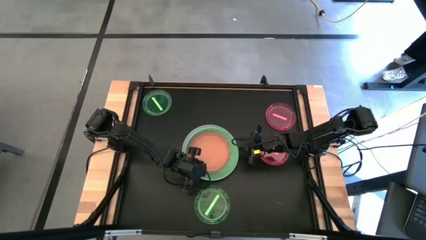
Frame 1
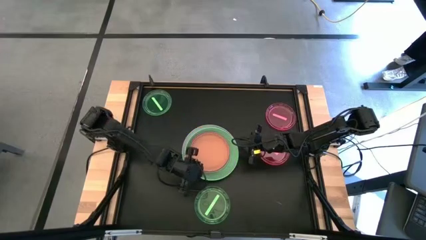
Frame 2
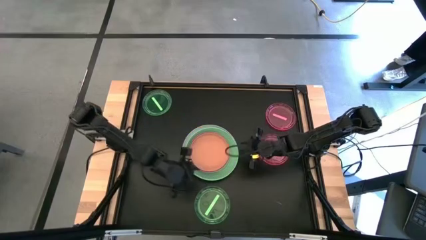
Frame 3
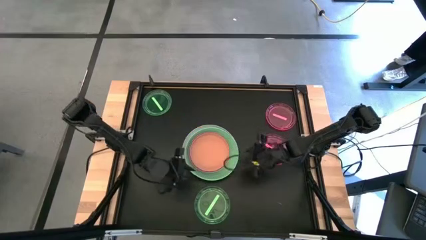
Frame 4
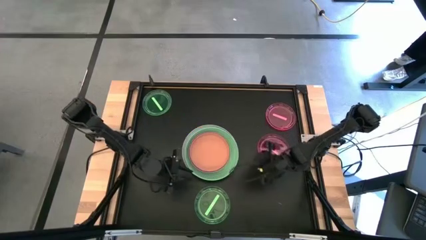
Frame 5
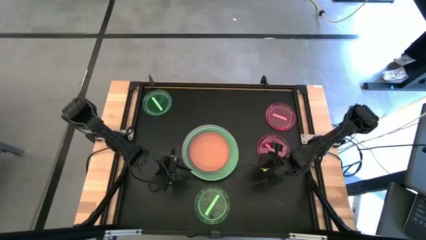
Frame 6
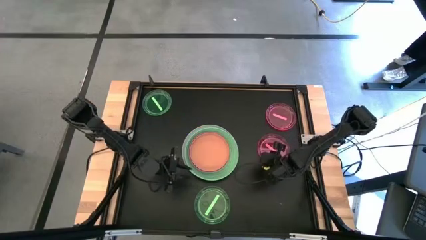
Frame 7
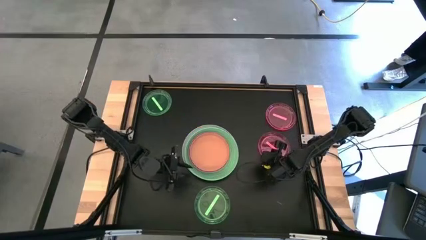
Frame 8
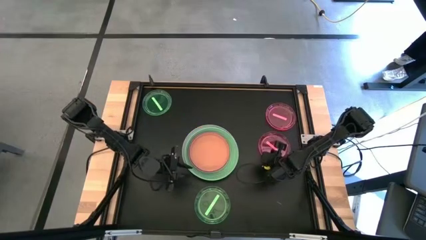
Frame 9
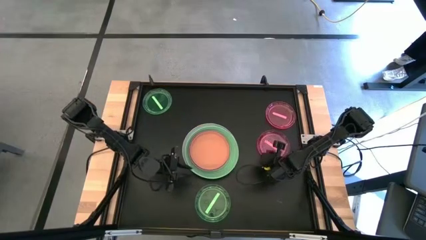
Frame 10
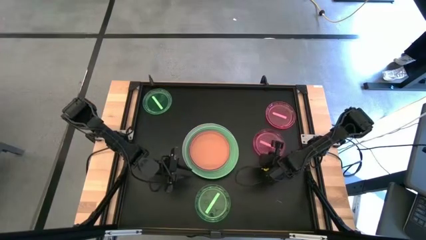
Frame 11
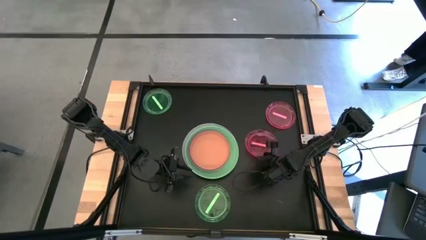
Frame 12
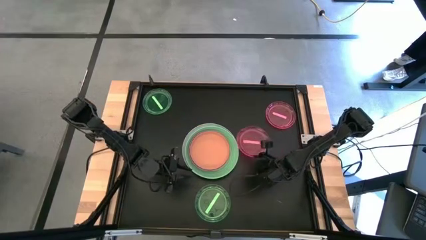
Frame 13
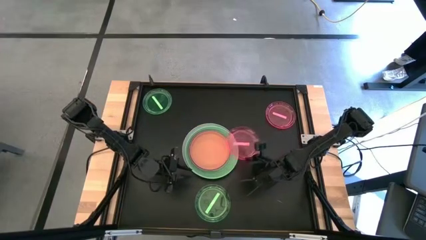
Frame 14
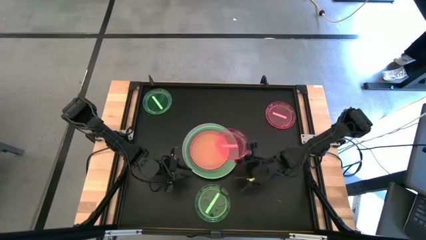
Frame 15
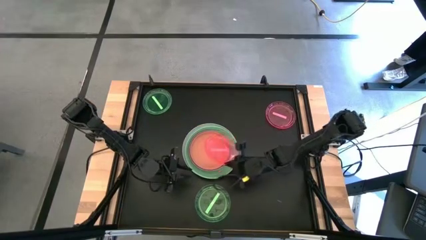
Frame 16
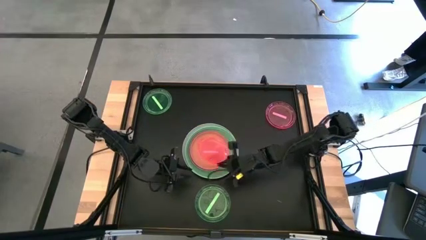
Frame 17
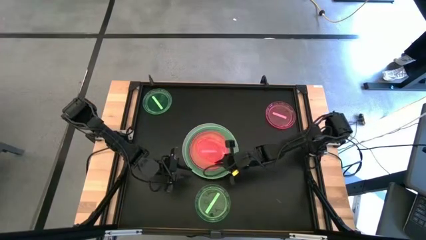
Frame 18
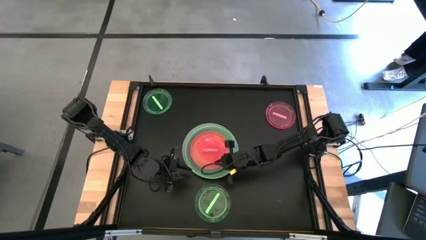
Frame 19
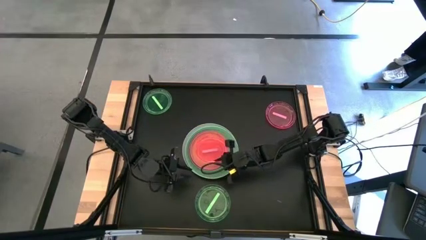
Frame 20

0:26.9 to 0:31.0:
Task: Stack plastic plates
Stack the bottom light pink plate on top of the orange plate

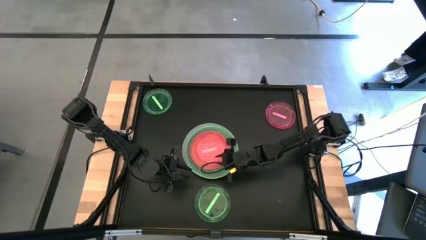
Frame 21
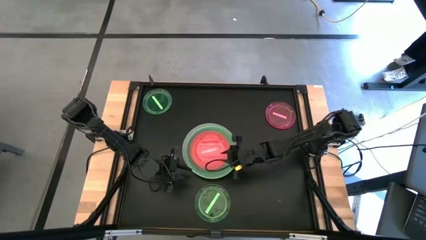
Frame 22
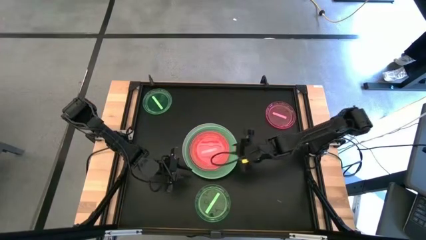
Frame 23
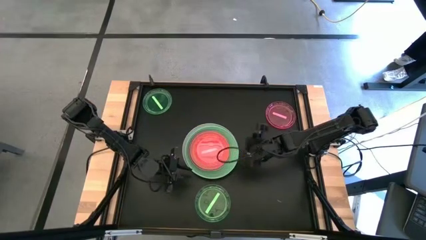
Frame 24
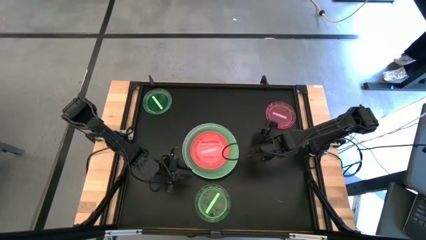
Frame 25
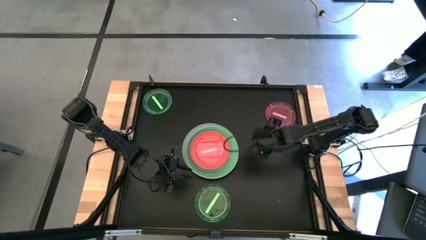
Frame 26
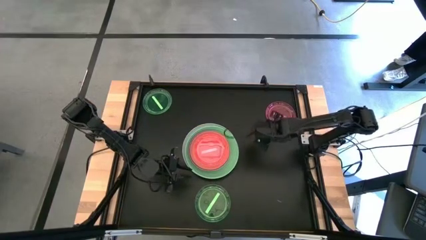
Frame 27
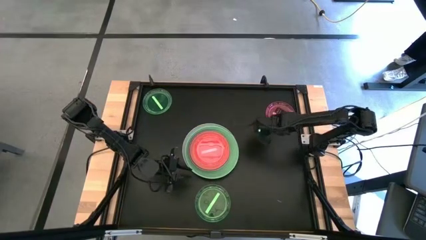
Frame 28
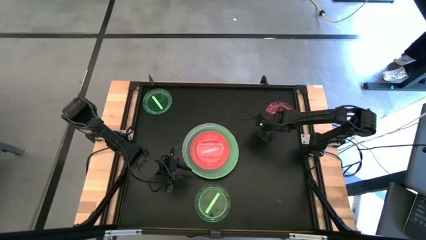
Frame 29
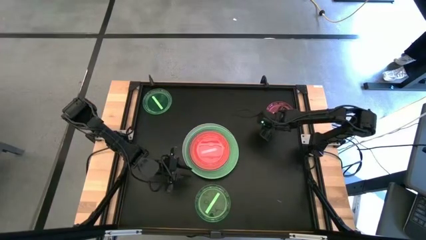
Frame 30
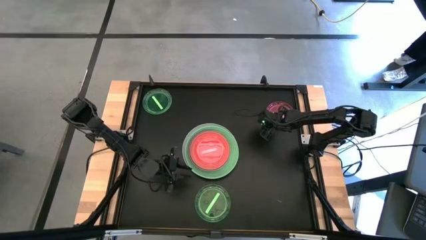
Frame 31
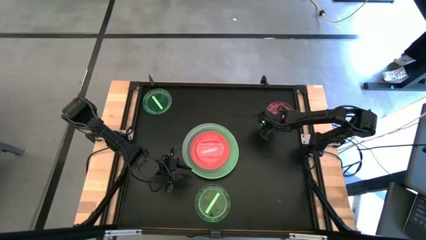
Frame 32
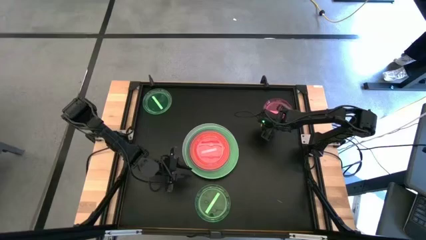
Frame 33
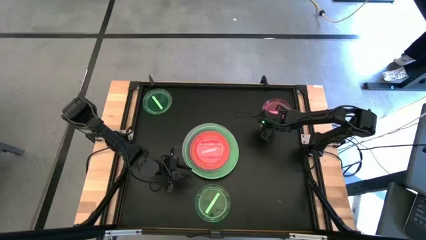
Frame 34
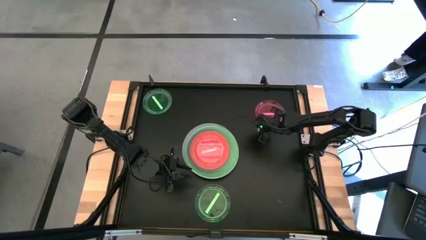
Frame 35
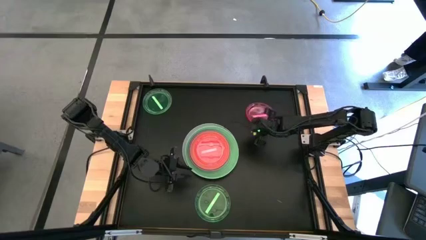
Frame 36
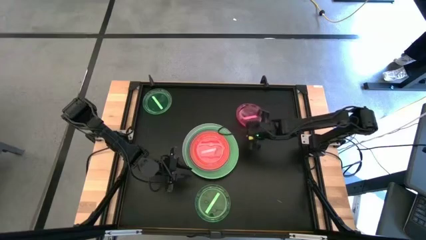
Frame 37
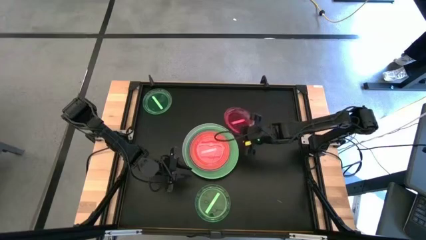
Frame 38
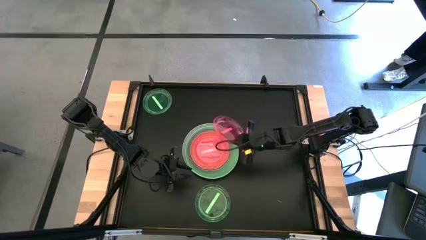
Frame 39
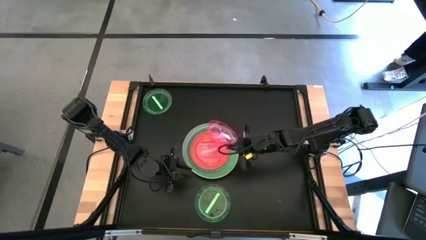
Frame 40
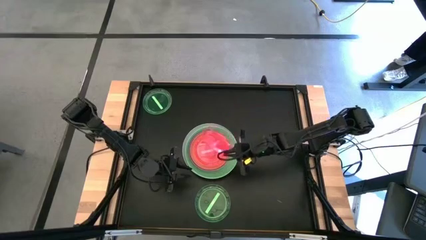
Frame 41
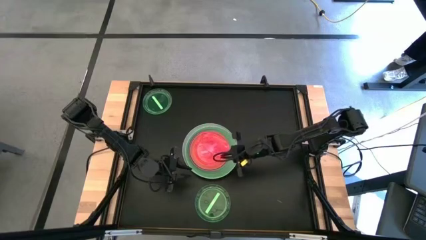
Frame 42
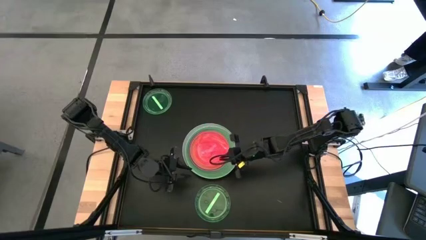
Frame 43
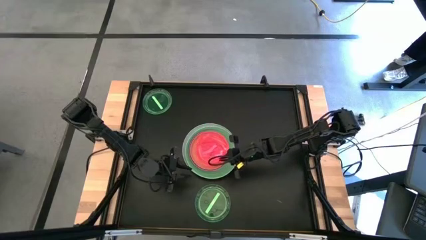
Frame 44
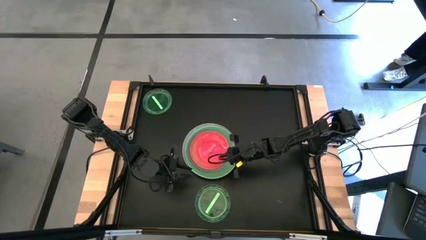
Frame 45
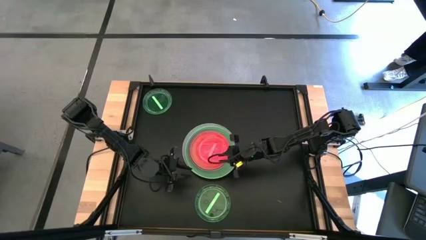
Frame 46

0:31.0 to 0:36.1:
Stack the light pink plate on top of the light pink plate

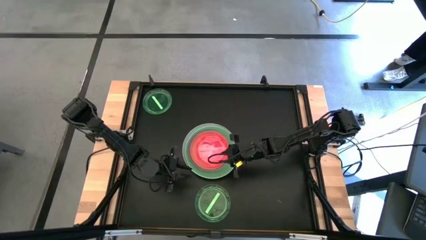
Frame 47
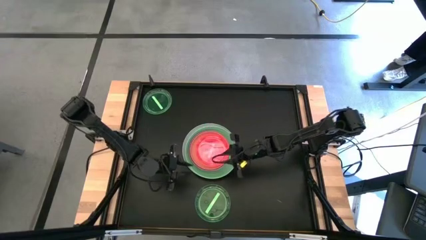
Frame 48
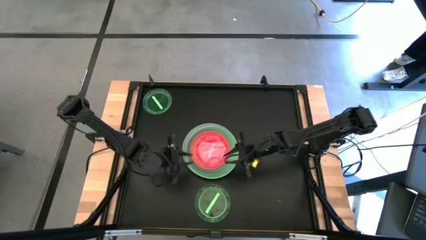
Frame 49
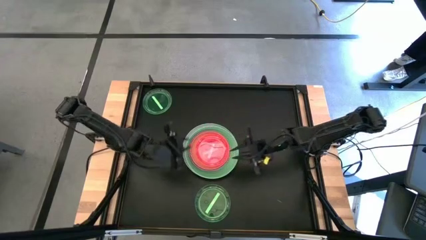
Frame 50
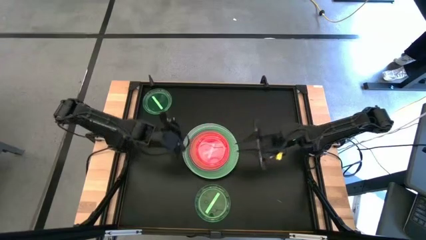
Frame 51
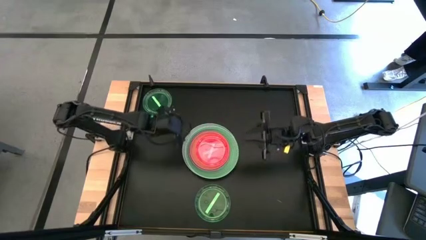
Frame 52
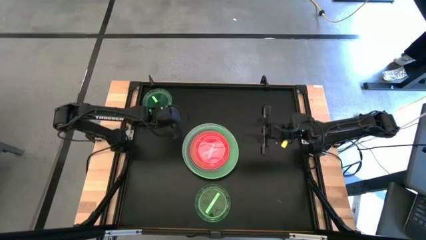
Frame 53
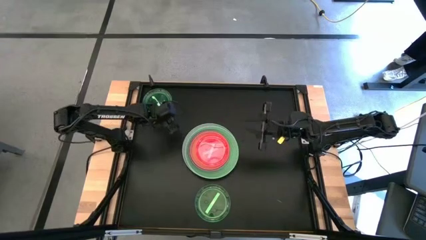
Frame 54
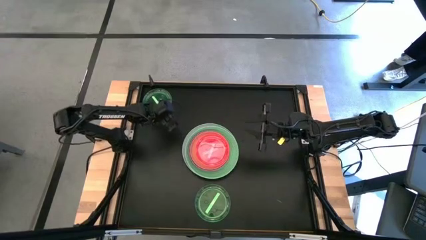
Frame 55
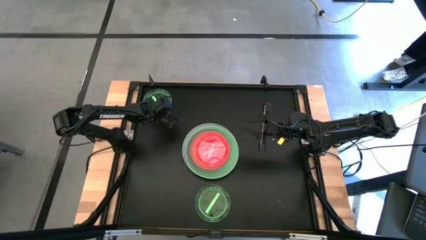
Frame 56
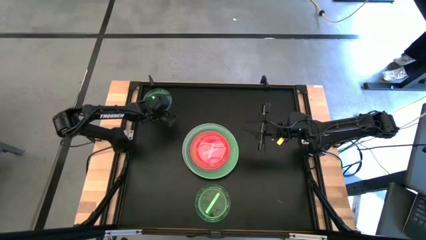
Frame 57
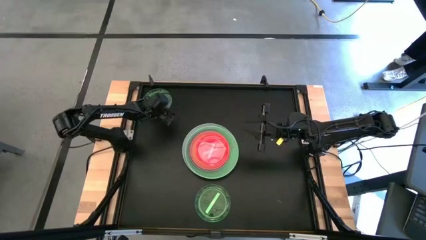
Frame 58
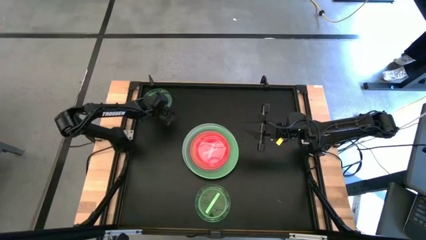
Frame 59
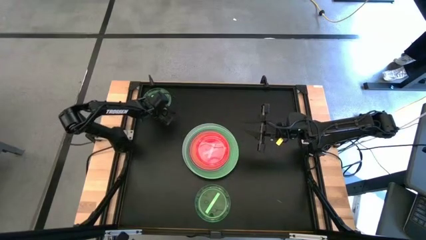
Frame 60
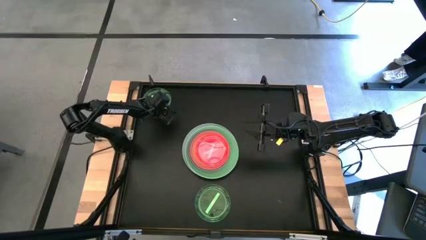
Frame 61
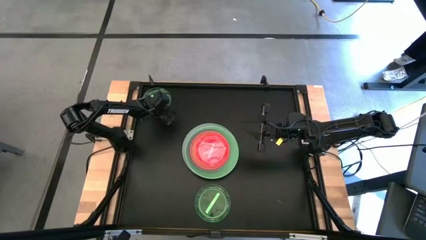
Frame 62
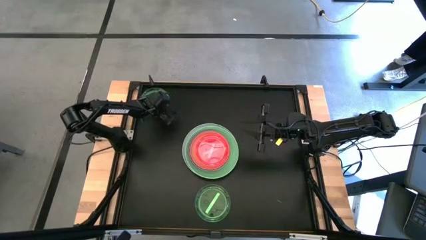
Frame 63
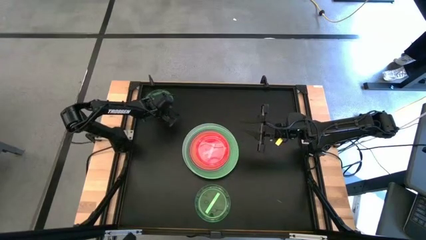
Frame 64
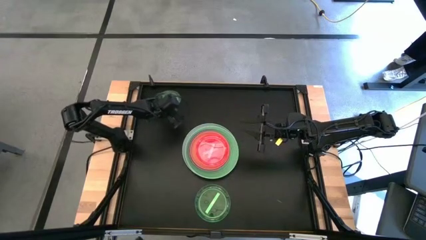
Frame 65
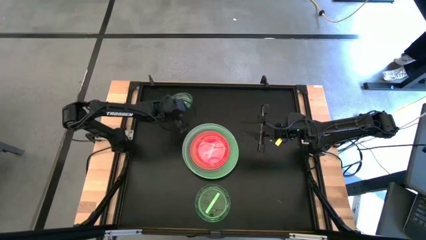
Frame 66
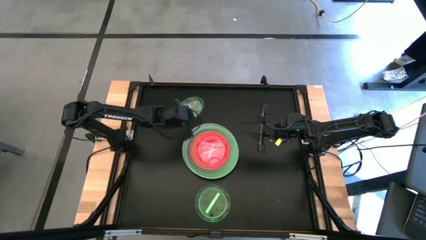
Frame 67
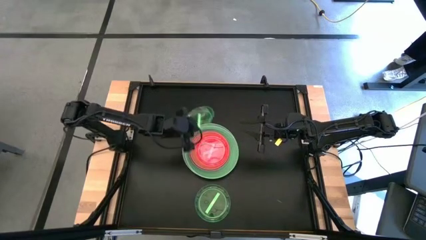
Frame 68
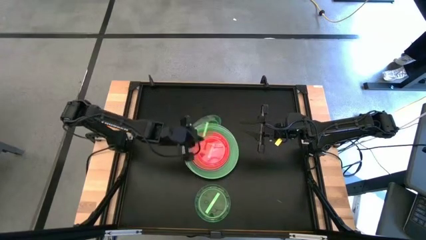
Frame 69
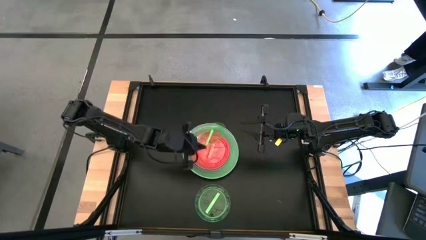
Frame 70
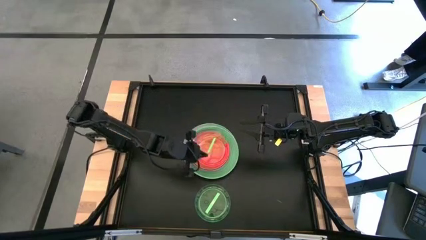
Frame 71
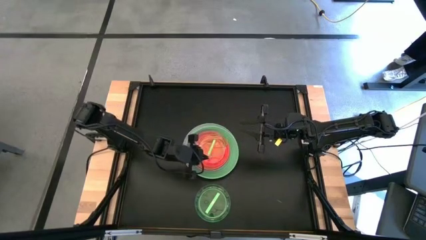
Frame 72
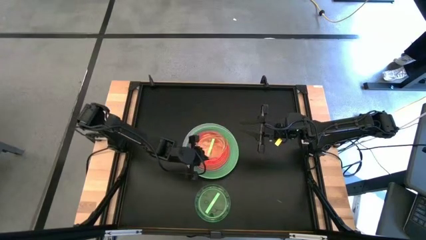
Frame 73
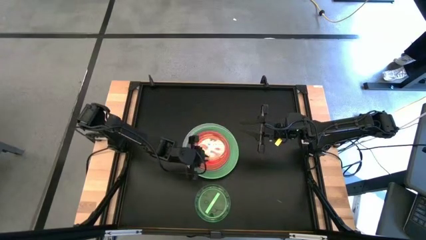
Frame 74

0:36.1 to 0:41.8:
Stack the top green plate on top of the light pink plate

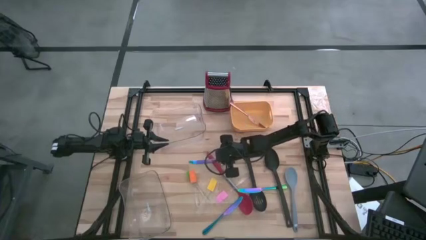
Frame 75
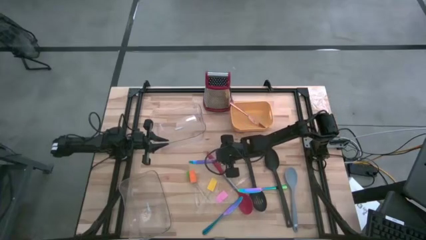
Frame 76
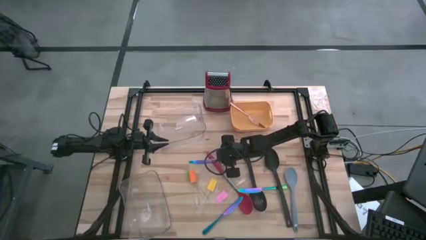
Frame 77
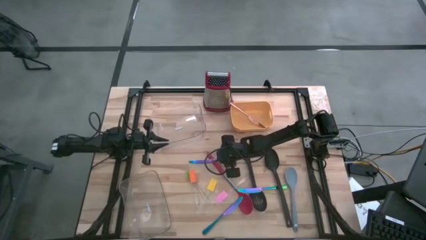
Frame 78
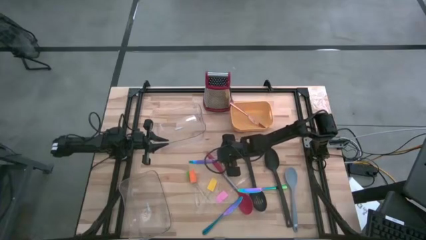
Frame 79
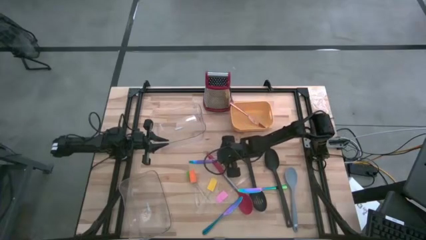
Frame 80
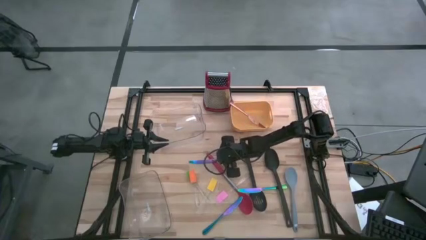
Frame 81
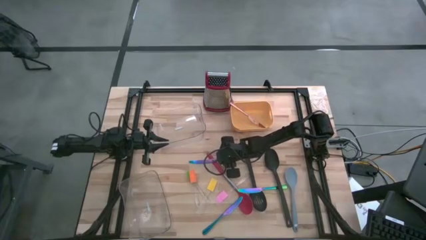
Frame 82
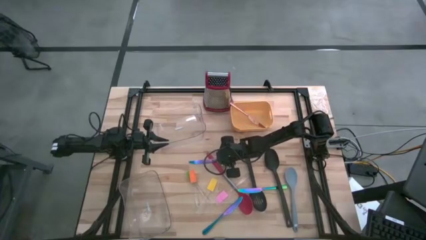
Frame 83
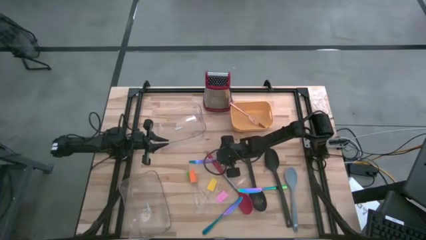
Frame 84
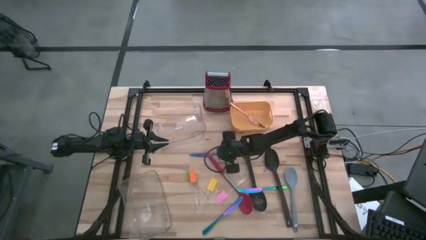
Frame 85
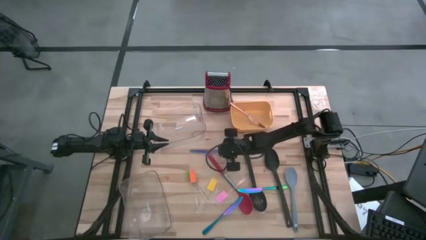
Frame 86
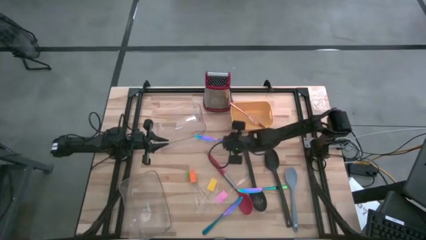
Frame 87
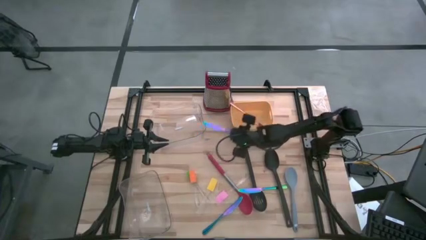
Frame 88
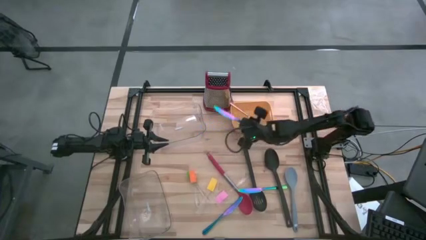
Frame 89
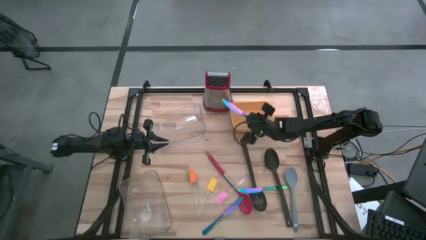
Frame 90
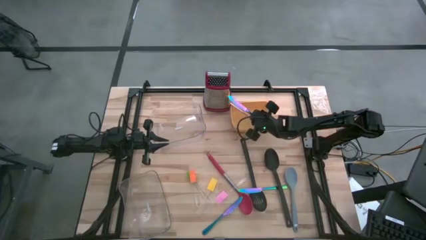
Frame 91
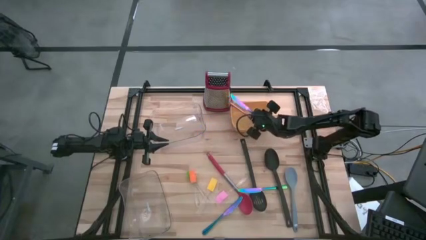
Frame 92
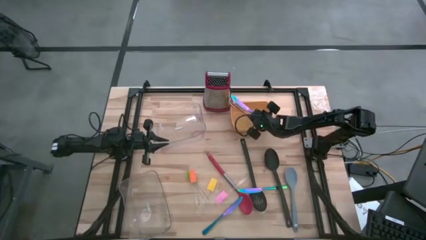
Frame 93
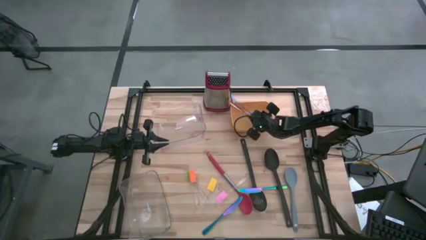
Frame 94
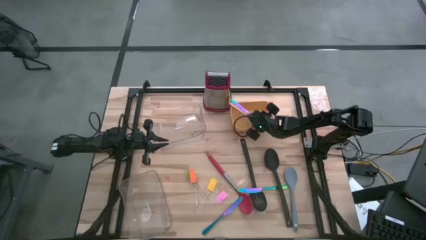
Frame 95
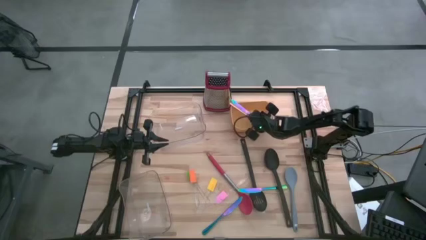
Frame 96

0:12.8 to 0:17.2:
Task: Pick & Place Kitchen Items
Put the blue knife into the yellow bin
